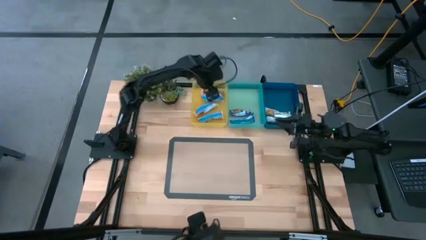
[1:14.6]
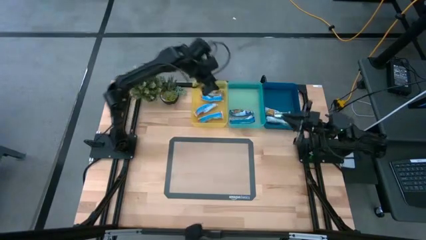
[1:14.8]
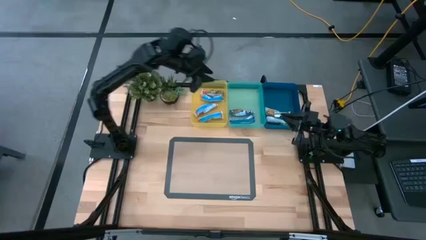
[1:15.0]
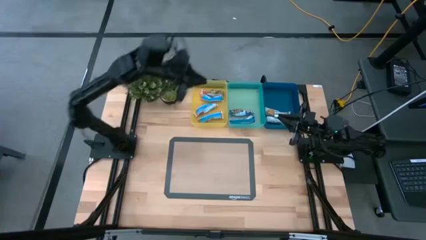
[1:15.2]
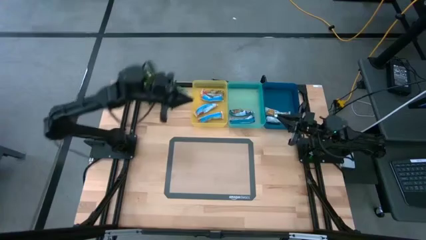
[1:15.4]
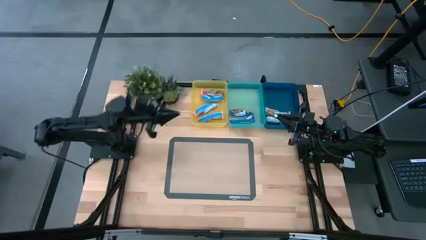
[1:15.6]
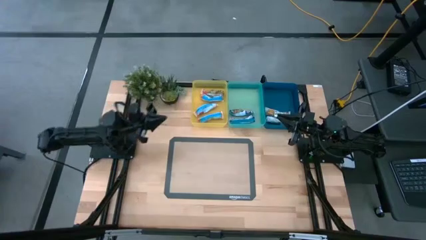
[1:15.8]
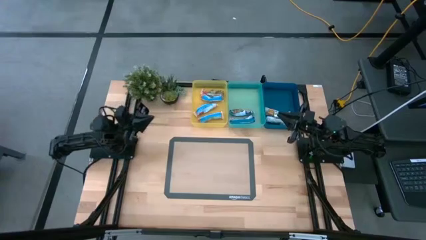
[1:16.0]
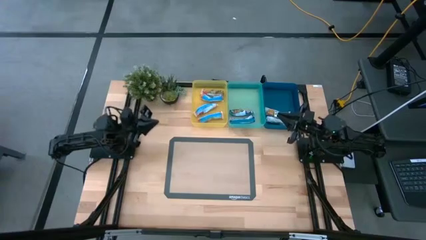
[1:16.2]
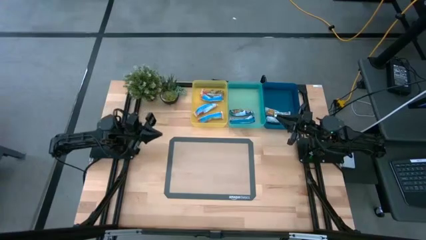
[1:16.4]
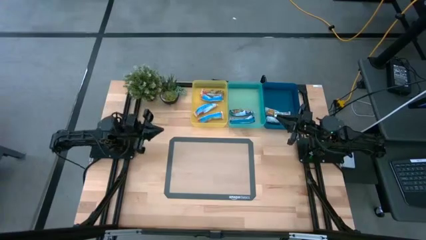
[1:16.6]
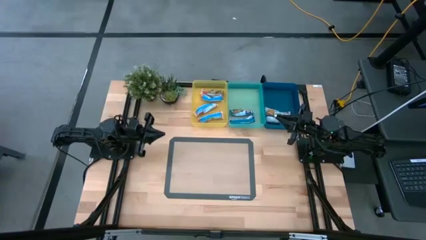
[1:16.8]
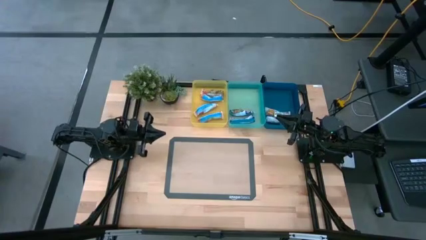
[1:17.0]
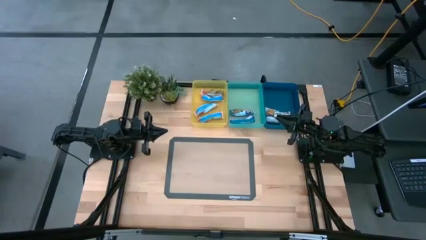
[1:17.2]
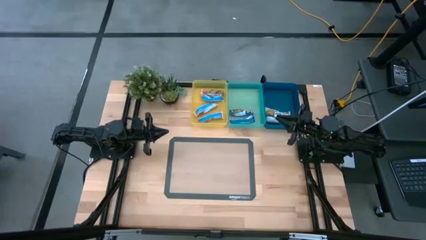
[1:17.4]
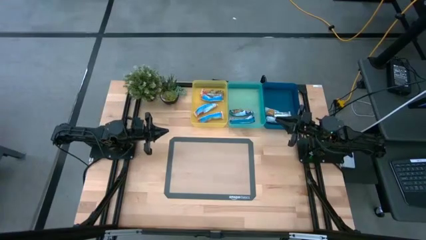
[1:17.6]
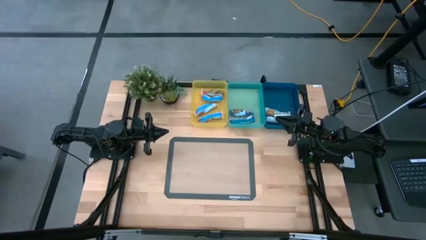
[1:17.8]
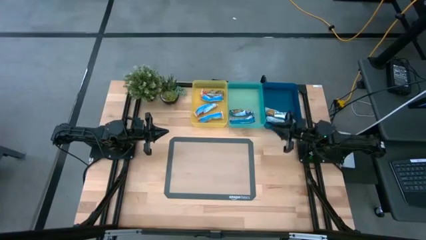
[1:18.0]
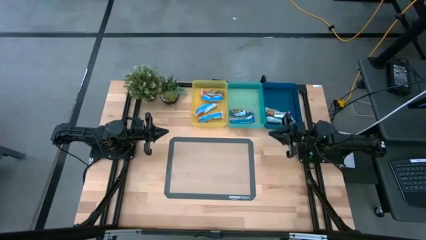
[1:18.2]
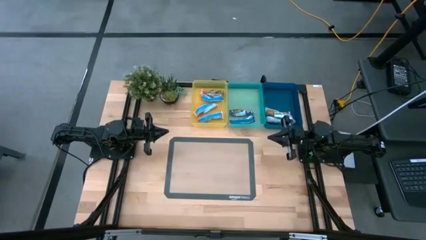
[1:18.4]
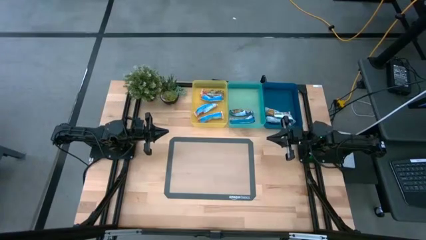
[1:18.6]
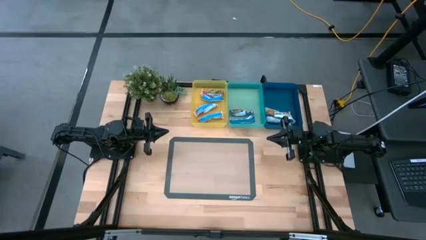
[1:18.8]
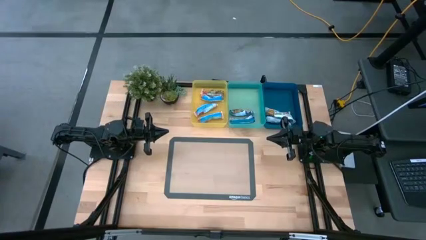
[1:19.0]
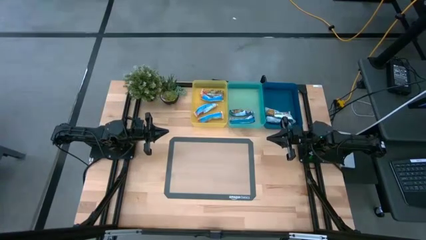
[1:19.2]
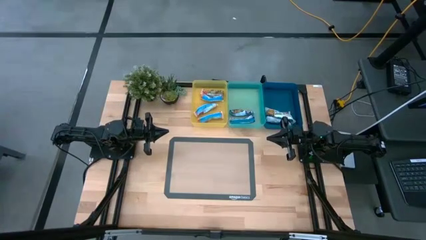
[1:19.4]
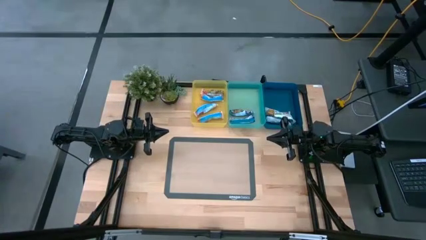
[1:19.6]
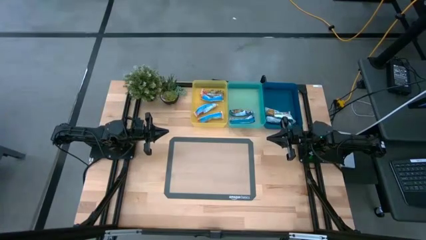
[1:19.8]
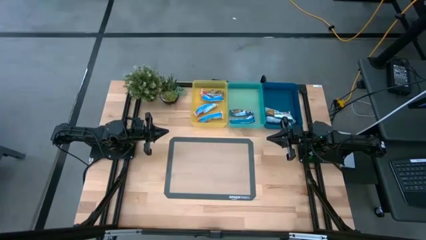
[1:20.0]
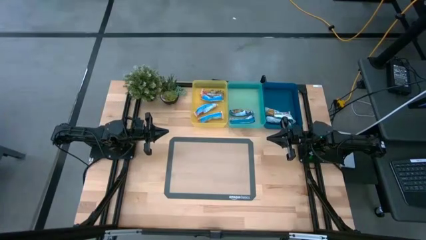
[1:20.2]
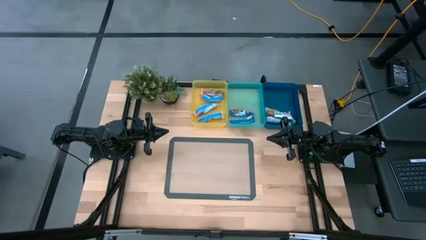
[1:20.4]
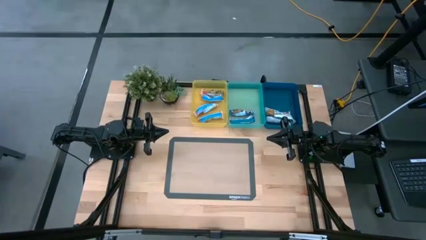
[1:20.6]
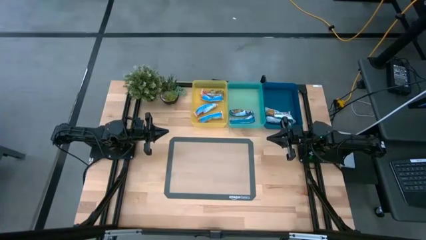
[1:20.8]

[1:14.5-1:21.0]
Task: Pick and place Granola Bars by type
Return to Home Position

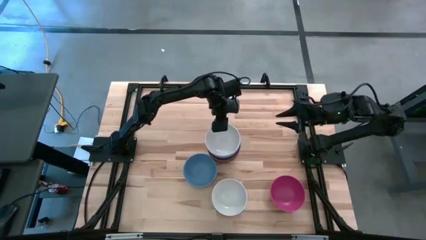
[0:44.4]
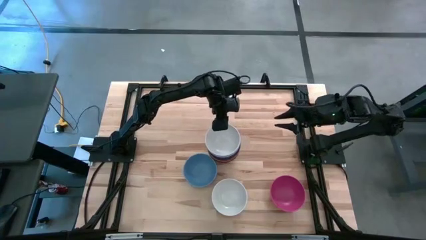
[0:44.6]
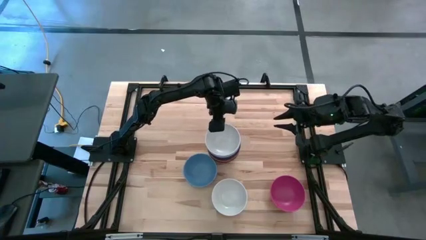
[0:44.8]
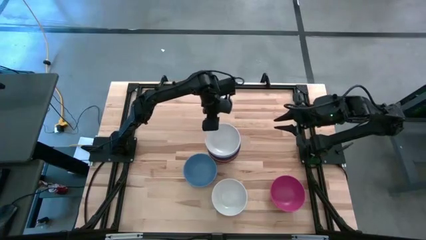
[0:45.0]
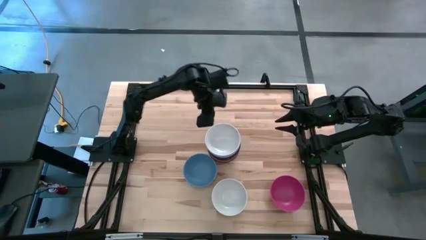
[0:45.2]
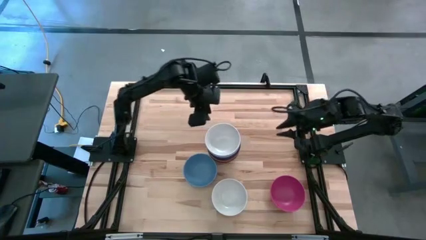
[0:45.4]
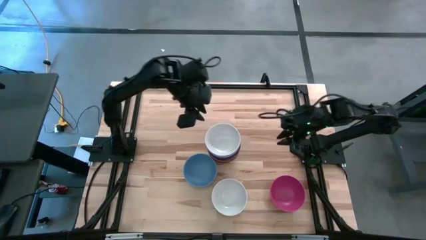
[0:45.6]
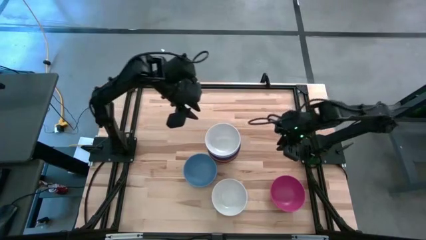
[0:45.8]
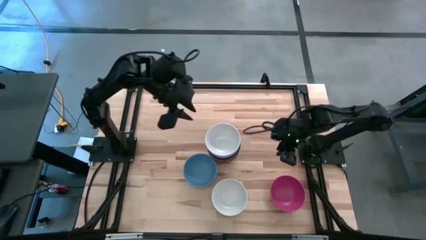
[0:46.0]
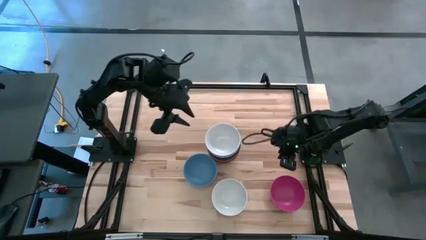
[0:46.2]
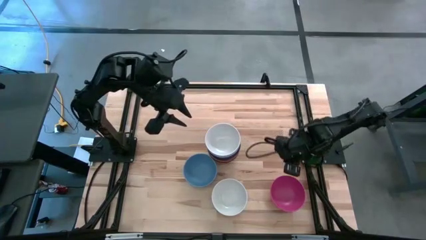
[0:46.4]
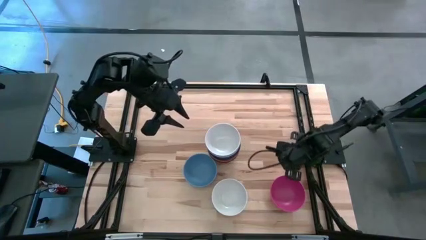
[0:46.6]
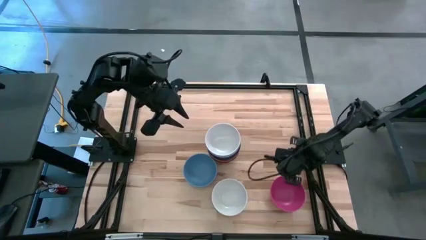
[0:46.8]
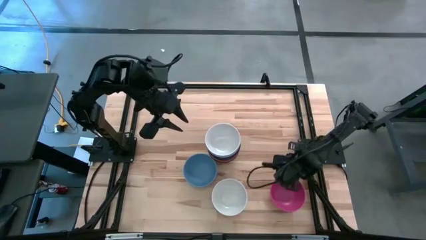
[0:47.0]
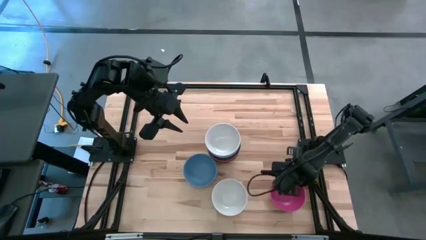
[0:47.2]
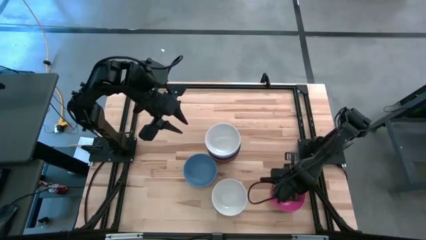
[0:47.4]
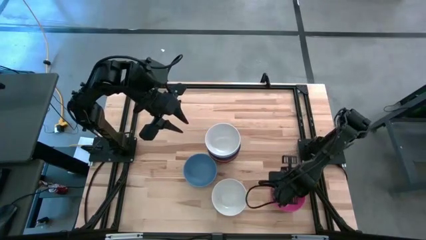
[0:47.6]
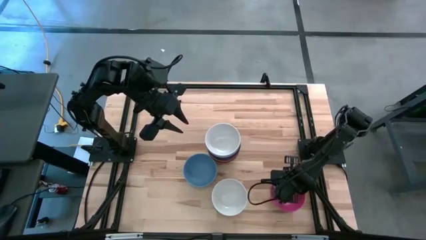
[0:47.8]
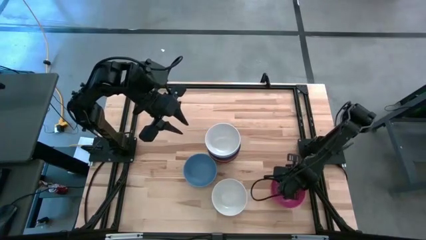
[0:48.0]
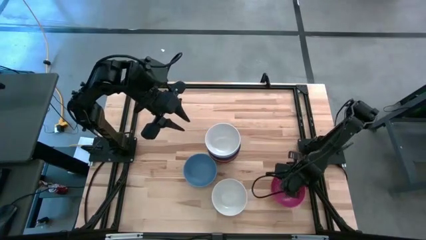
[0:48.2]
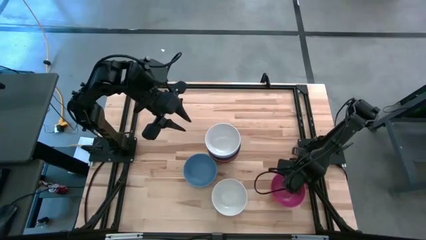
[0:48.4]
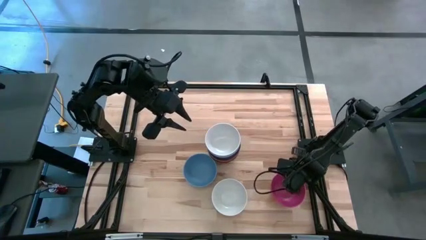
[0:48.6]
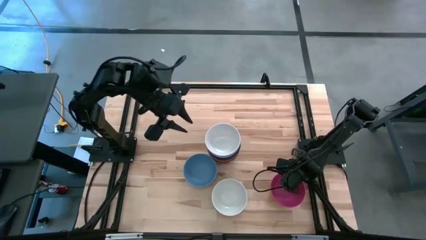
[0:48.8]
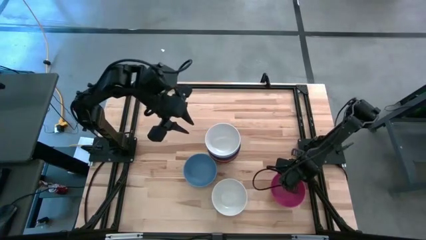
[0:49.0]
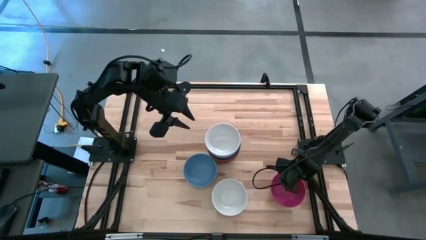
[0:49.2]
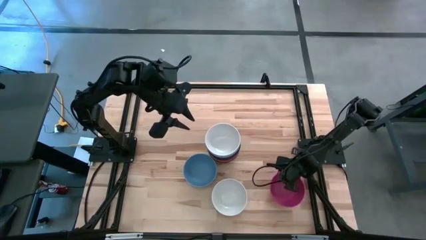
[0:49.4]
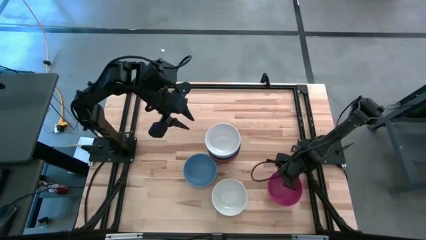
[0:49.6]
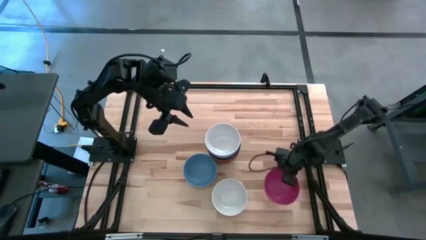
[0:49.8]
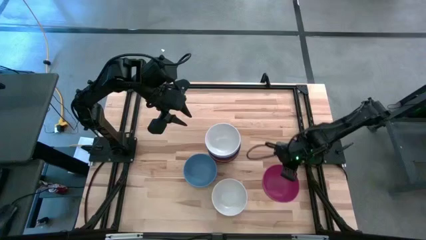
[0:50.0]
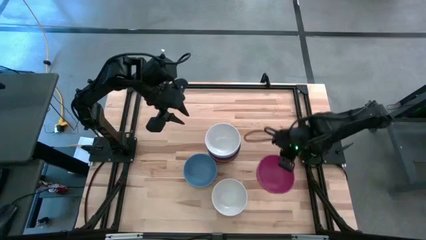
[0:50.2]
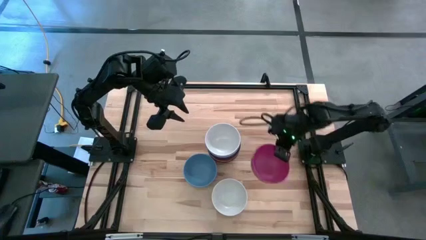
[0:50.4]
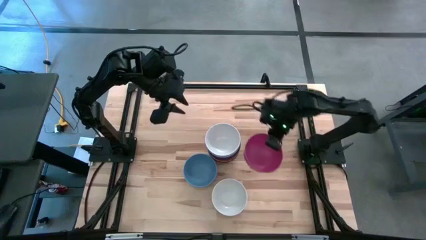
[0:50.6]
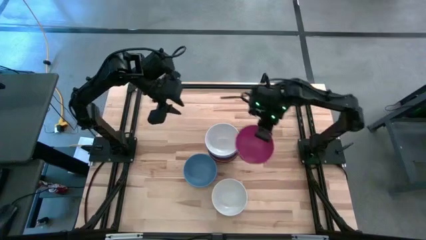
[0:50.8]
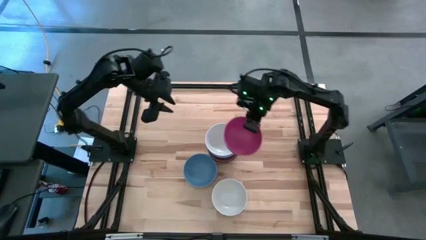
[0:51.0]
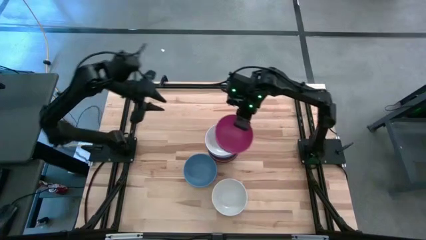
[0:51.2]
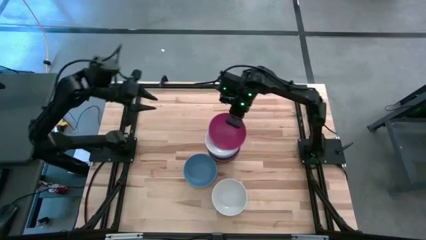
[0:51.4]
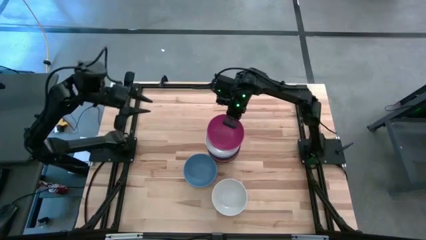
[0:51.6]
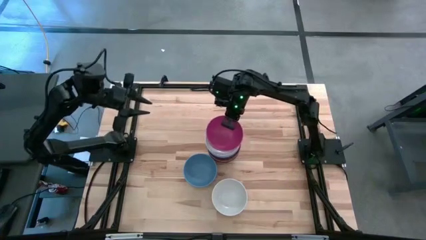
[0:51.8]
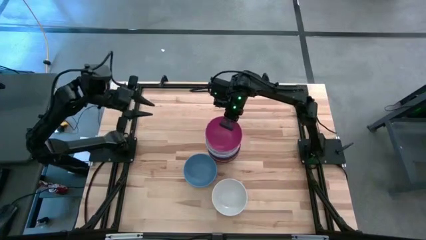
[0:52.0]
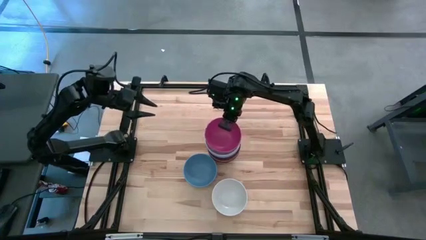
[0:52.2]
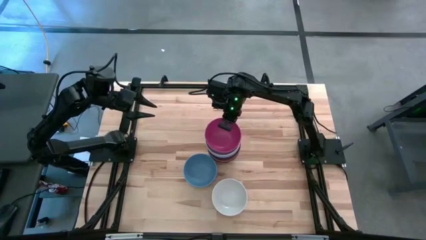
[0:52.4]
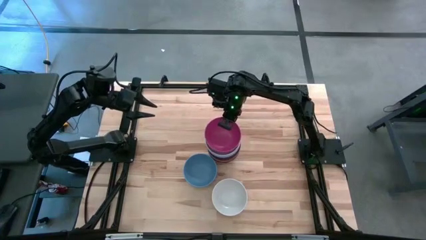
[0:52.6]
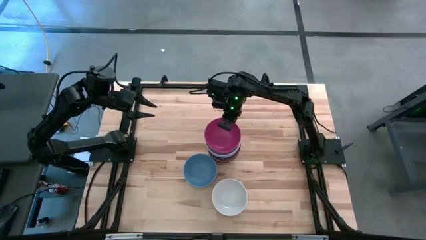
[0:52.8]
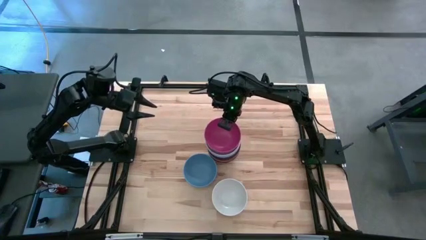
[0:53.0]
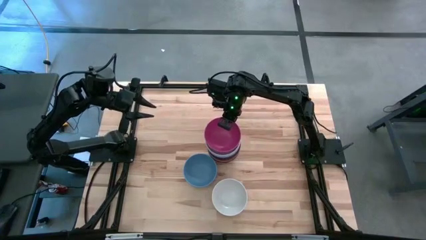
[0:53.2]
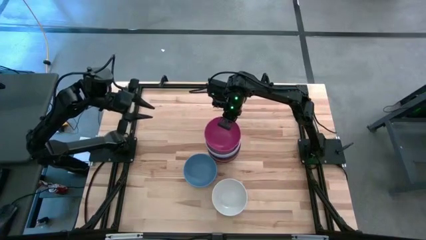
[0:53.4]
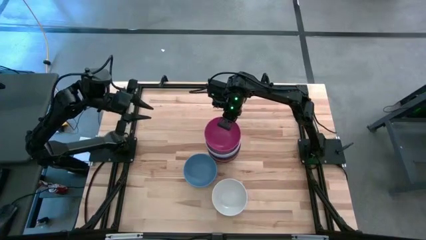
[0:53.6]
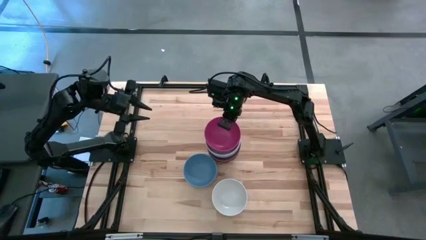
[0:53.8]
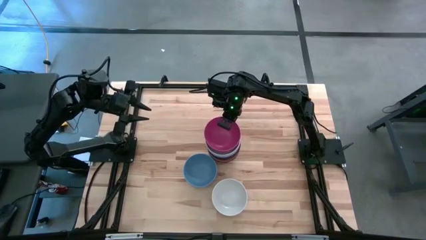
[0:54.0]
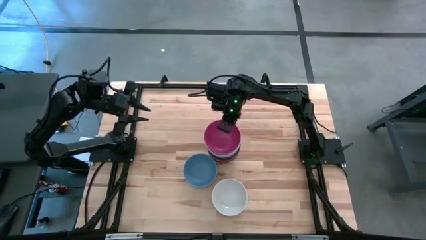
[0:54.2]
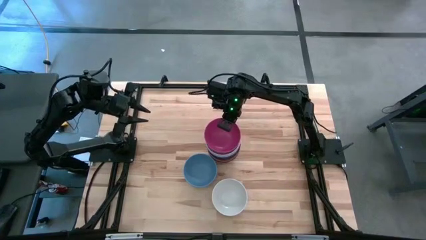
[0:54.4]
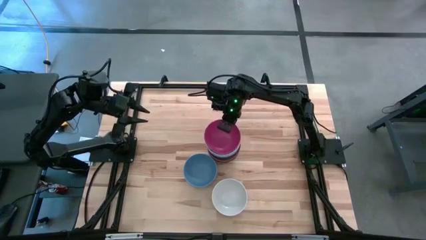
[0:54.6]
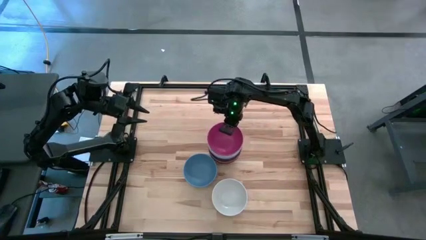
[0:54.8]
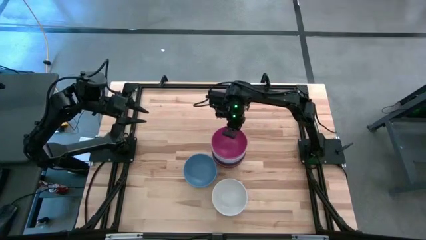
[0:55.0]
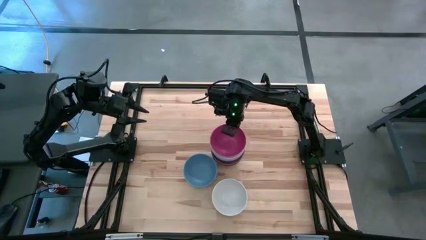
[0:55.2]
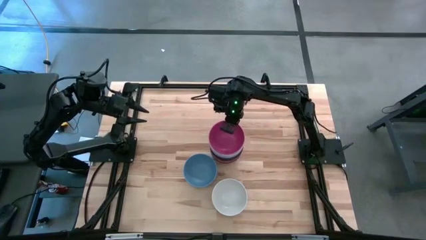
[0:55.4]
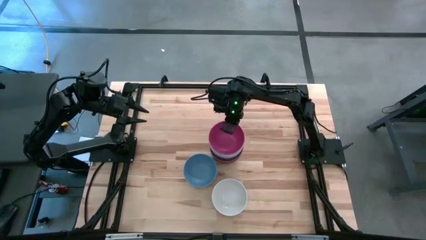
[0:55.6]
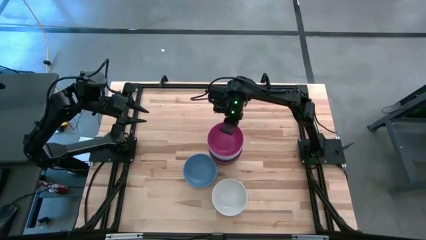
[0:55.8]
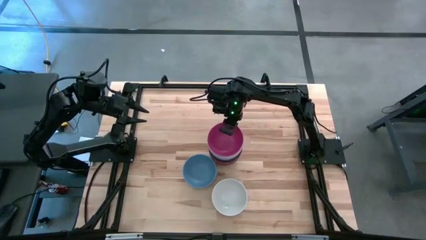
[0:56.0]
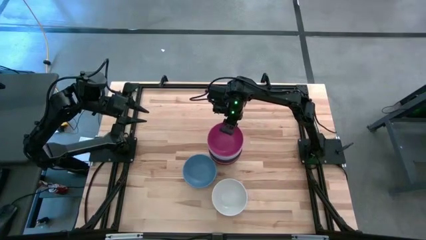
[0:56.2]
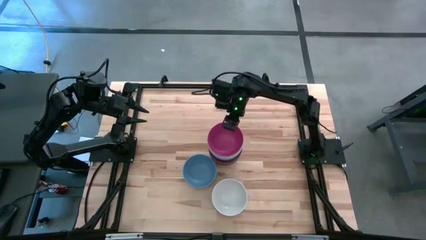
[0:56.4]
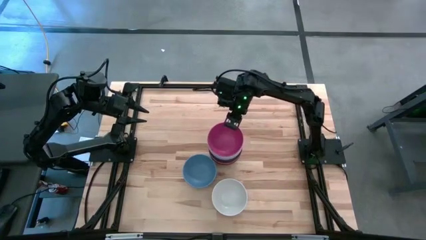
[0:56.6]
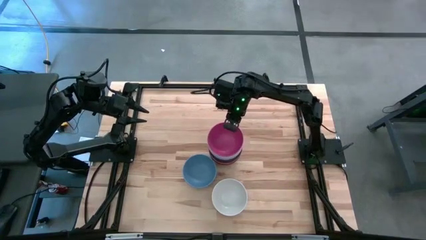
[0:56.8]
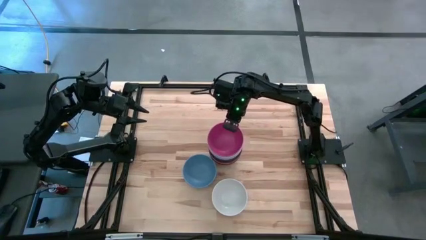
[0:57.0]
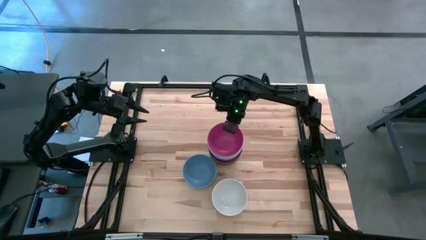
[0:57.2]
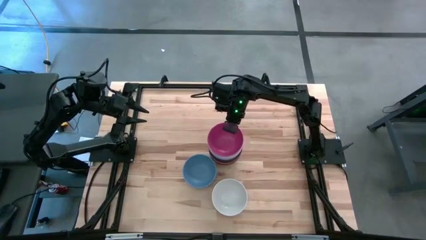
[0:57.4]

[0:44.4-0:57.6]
Task: Nest bowls inside each other
Stack the pink bowl on the white bowl
